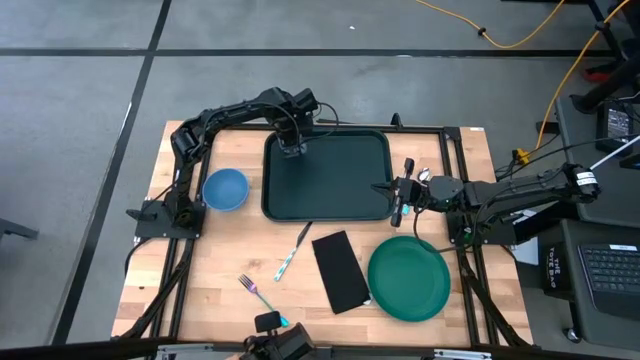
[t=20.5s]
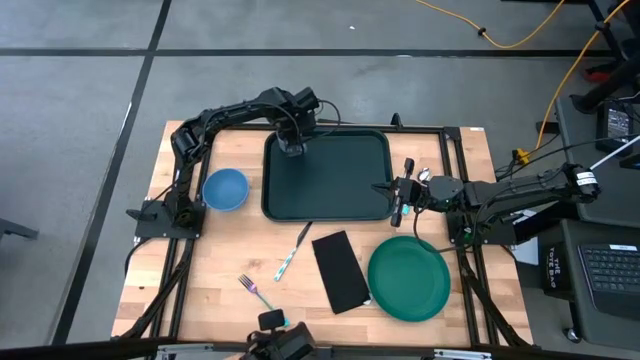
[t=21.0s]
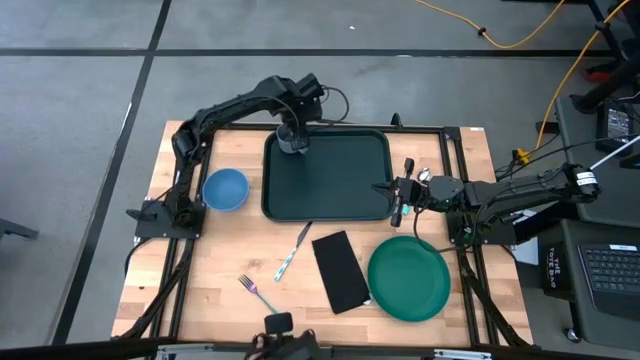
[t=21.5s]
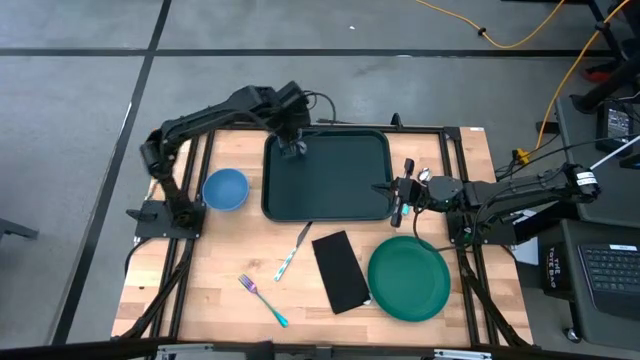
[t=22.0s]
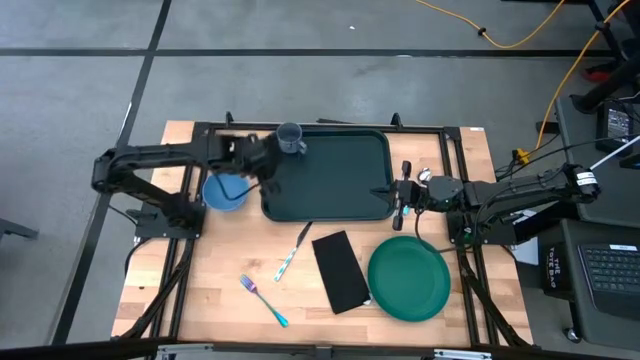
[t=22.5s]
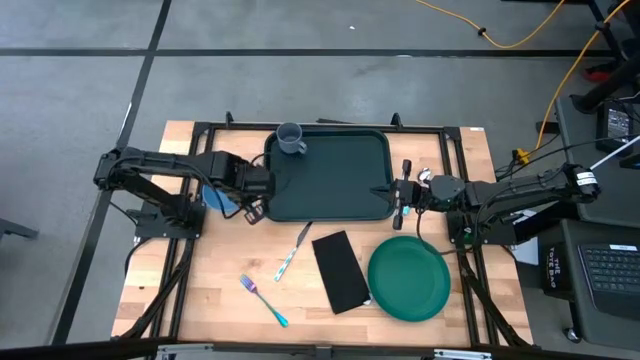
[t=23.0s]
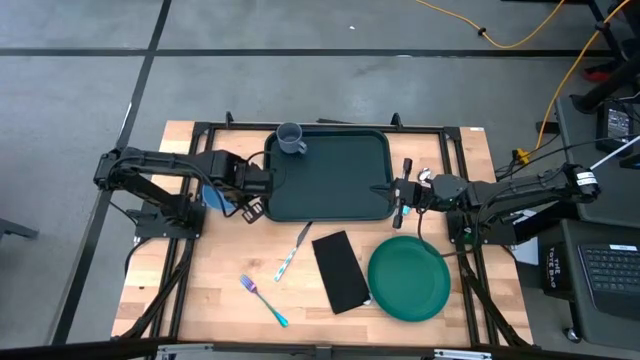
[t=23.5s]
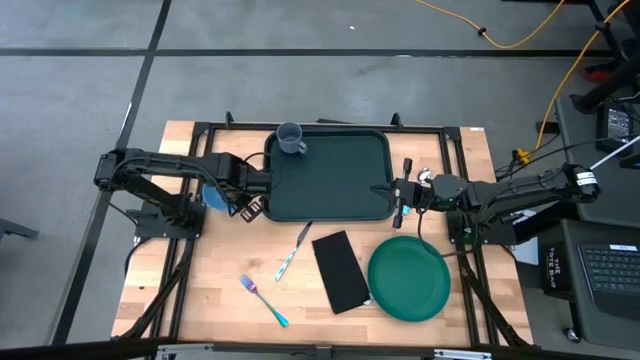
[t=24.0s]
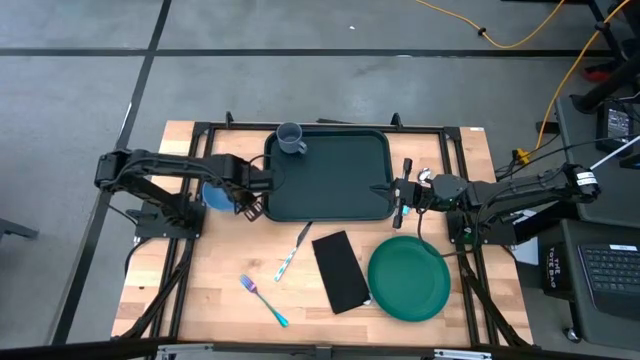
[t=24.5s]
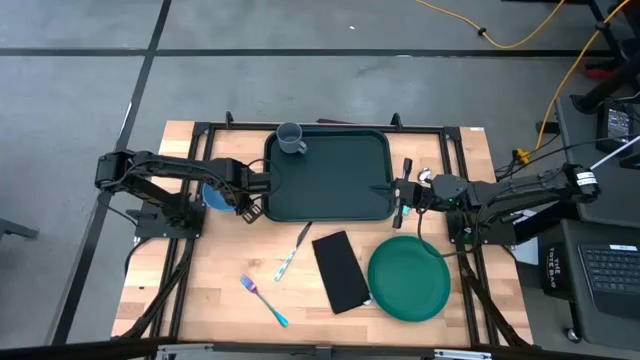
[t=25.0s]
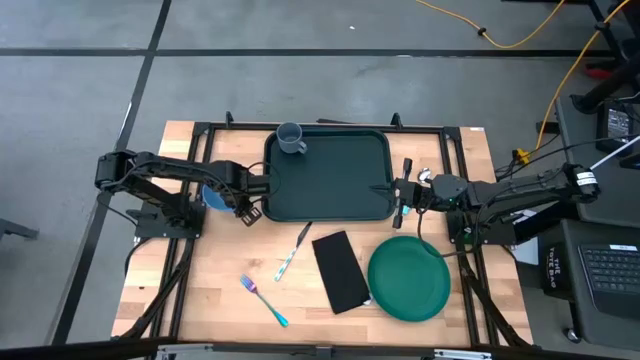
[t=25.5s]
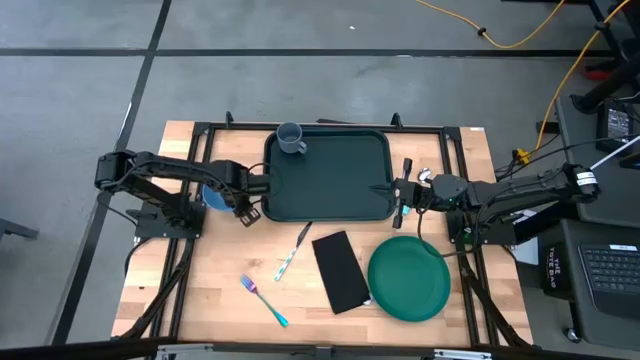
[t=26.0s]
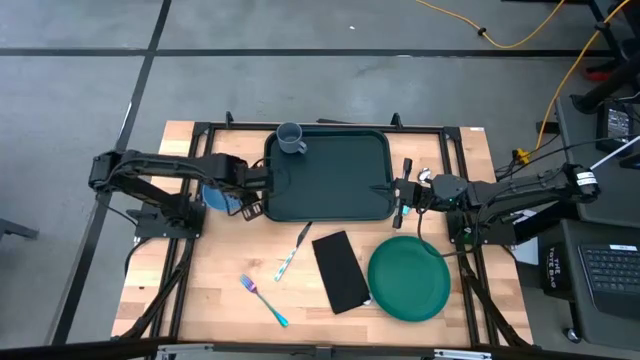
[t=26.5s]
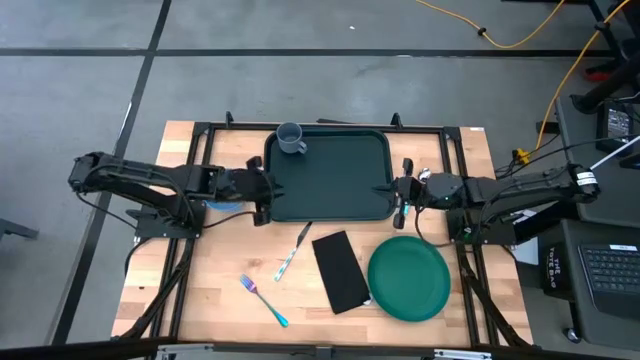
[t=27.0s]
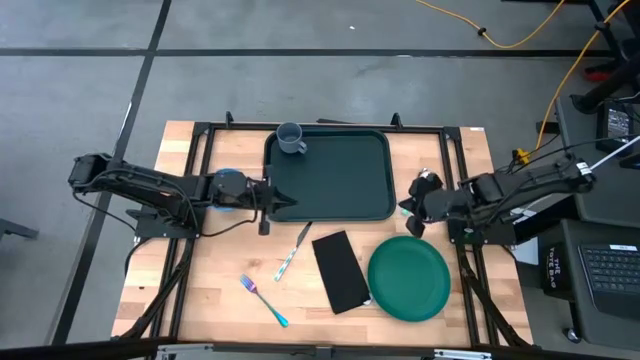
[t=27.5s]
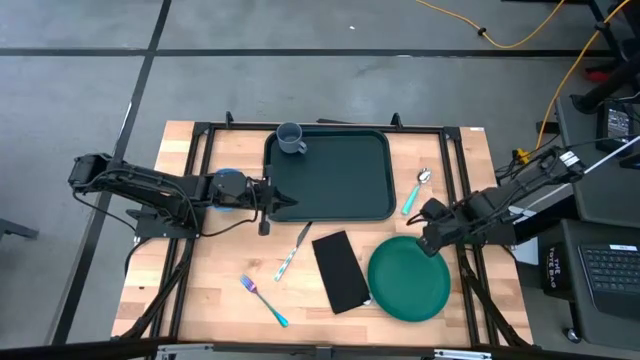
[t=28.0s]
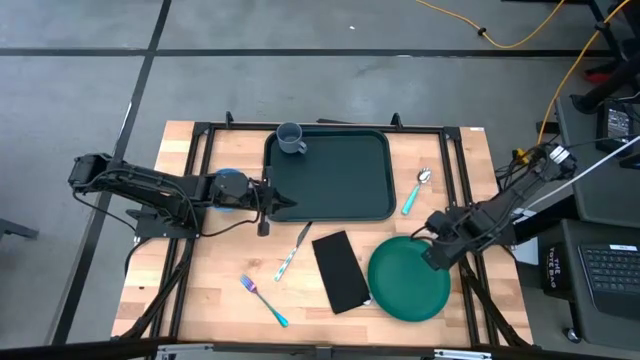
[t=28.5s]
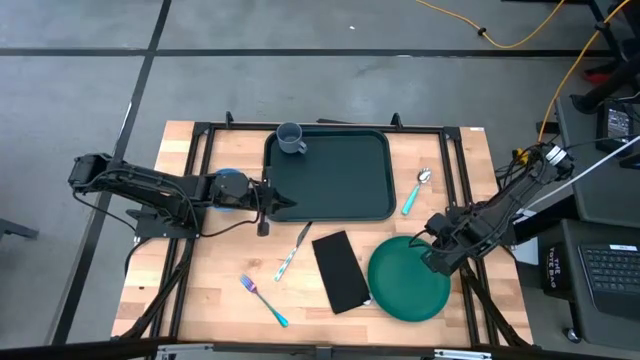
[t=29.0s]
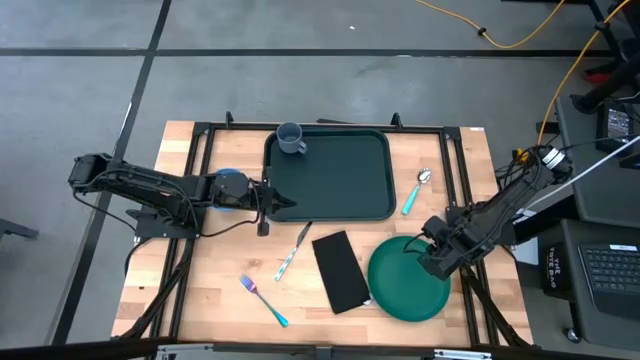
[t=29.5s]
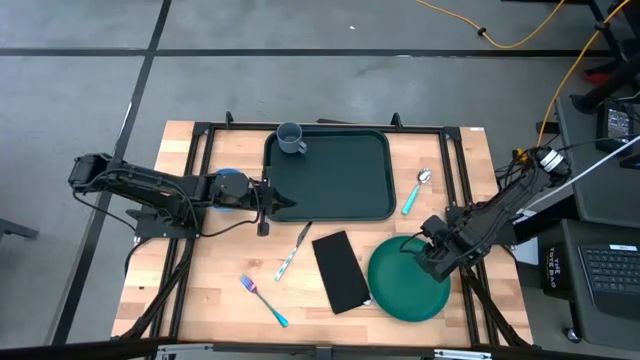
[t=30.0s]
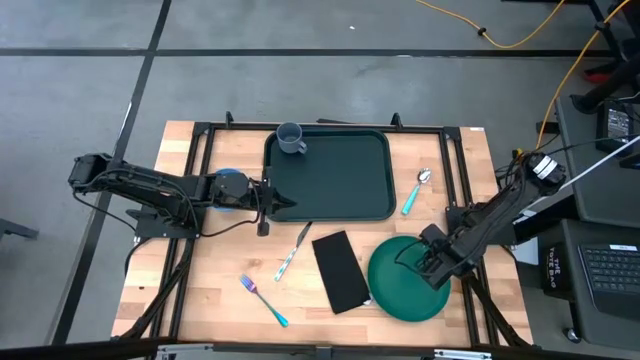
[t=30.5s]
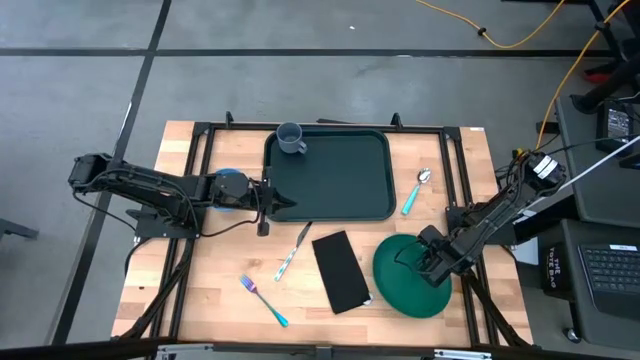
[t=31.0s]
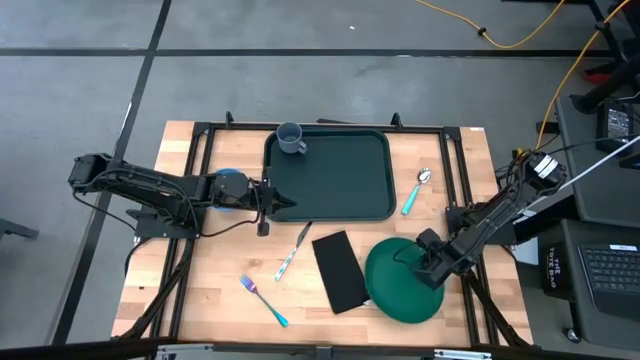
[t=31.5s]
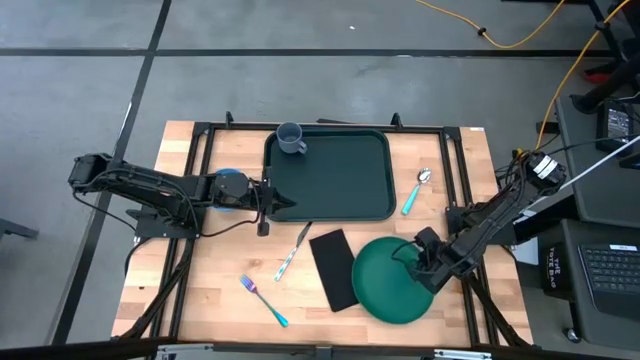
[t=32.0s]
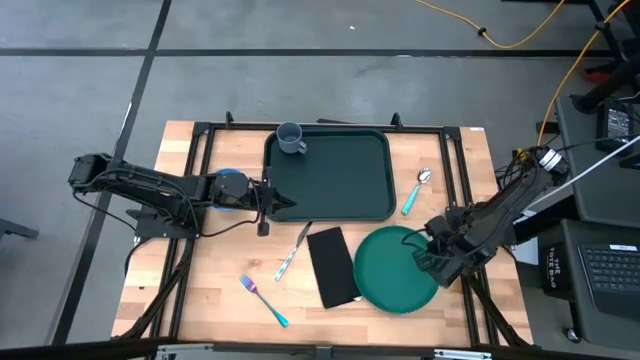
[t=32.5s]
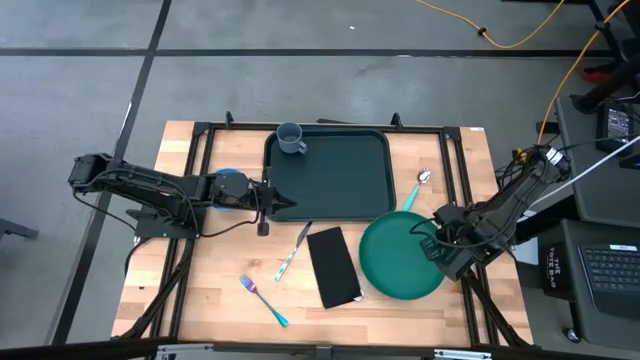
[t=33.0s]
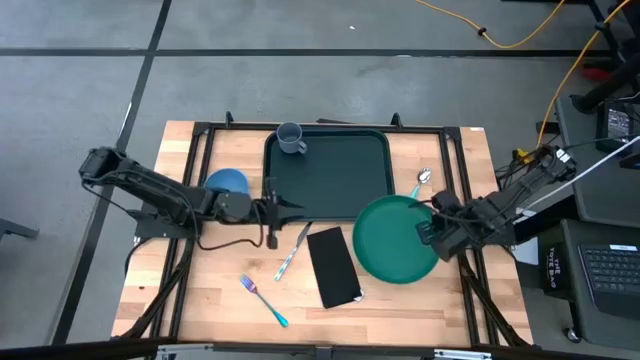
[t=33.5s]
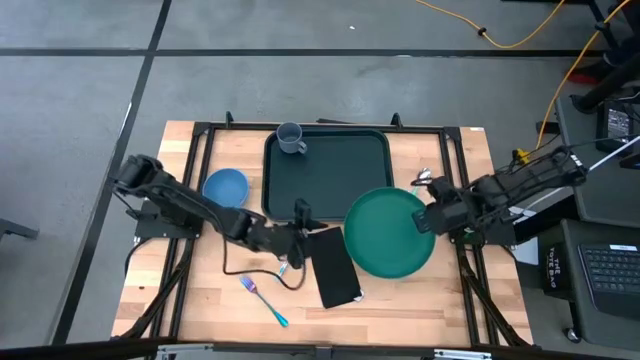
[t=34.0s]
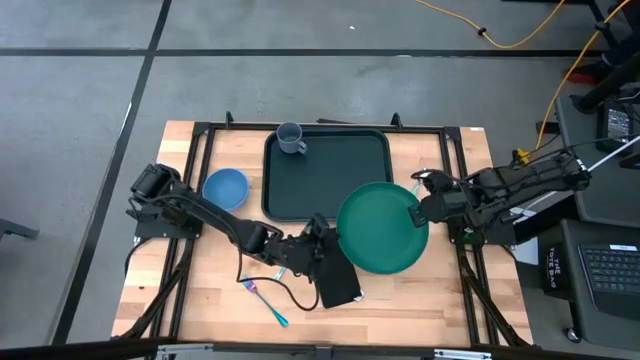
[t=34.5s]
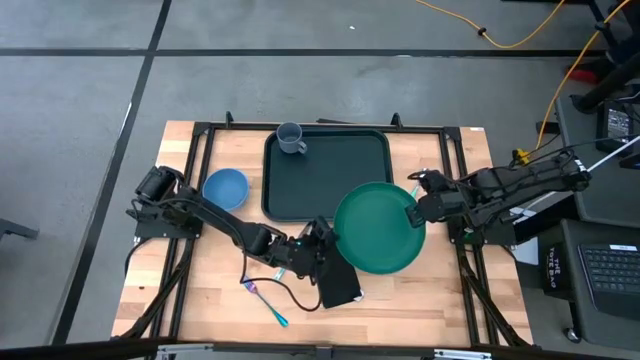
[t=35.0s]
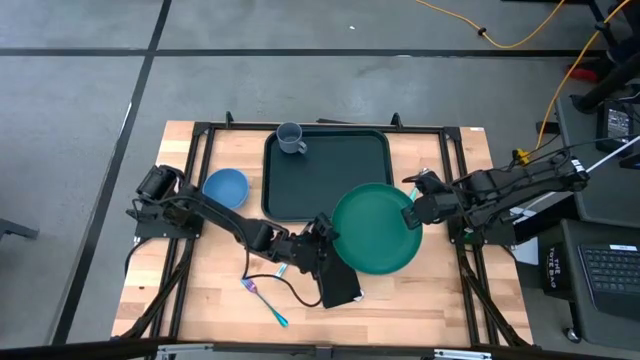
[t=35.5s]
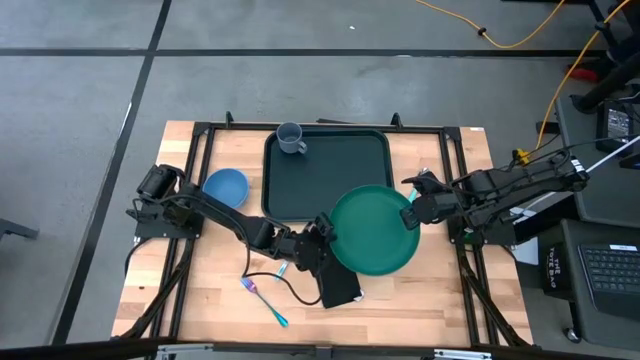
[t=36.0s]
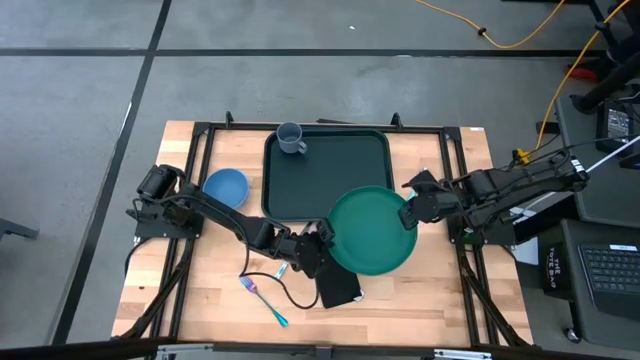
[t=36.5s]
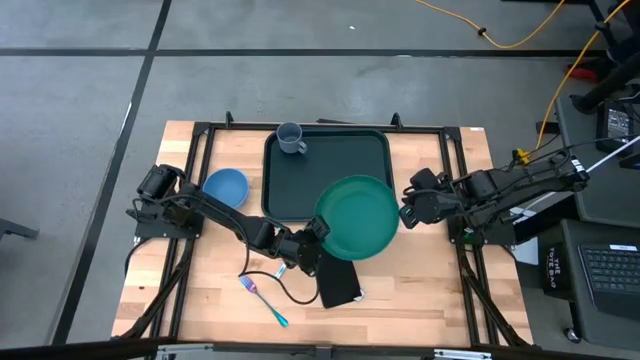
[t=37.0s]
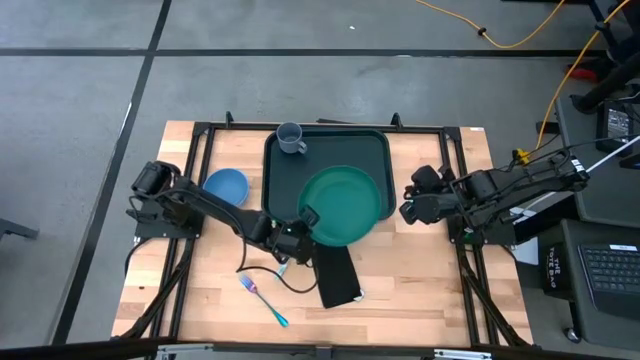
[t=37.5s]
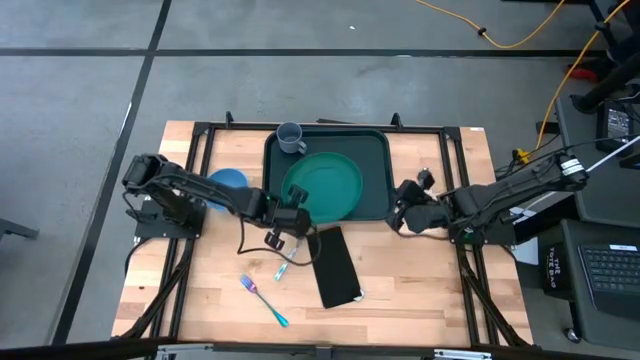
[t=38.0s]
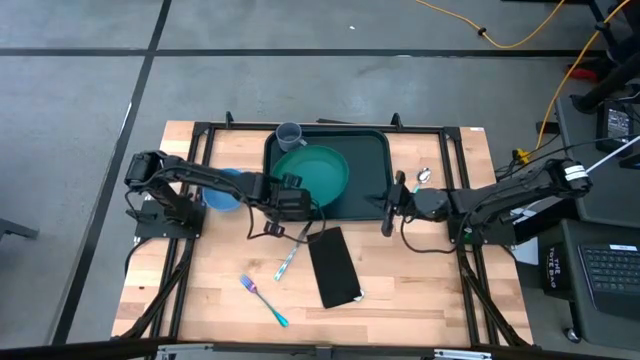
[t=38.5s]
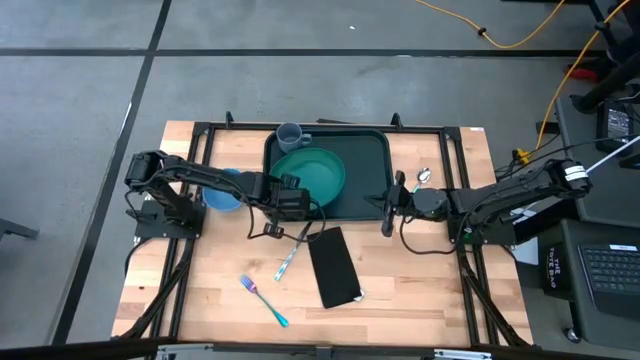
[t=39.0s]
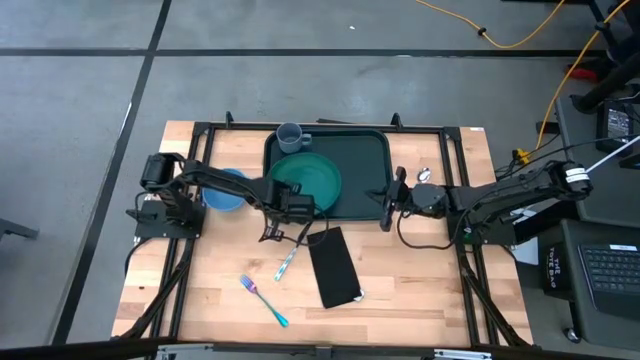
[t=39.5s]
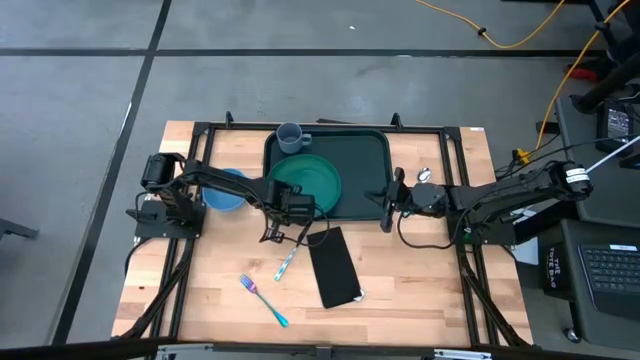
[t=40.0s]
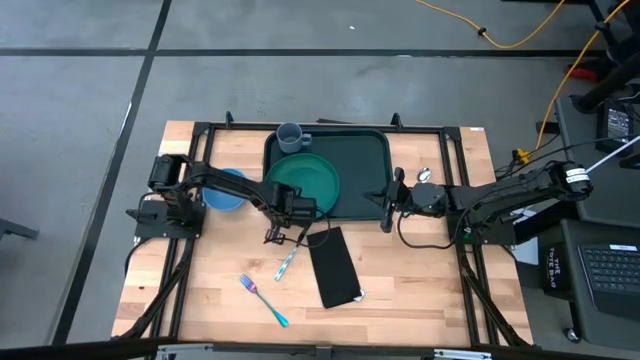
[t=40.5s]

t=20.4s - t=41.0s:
Task: Set up tray
Put the plate on the tray to the bottom of the mug
